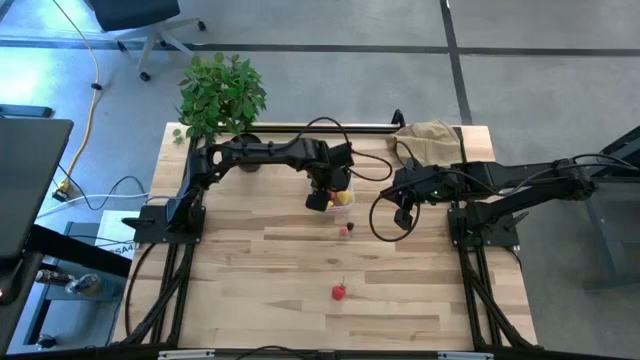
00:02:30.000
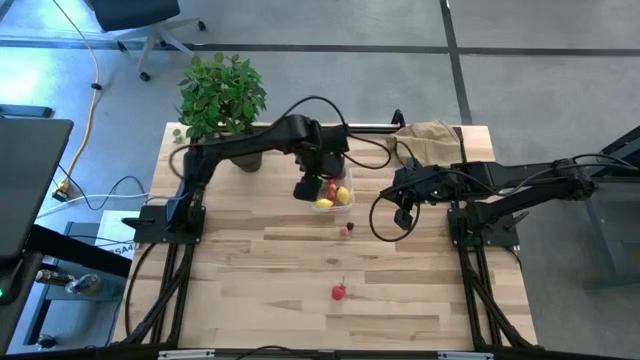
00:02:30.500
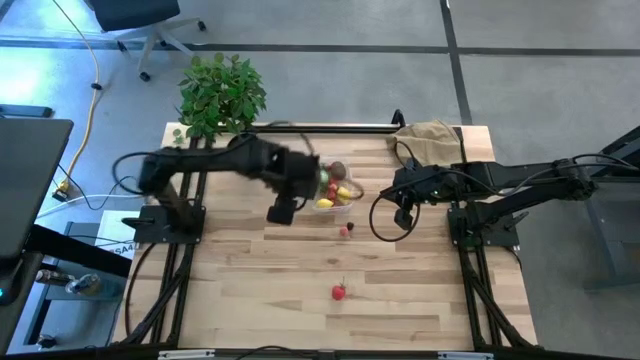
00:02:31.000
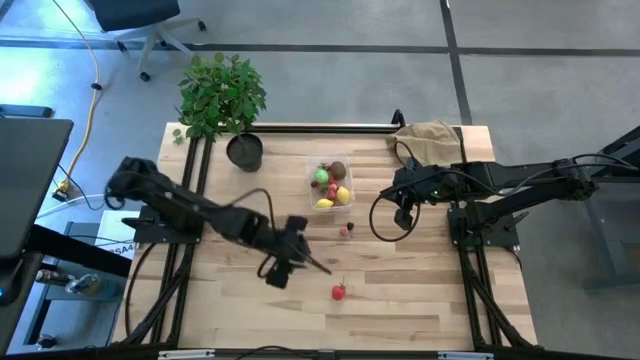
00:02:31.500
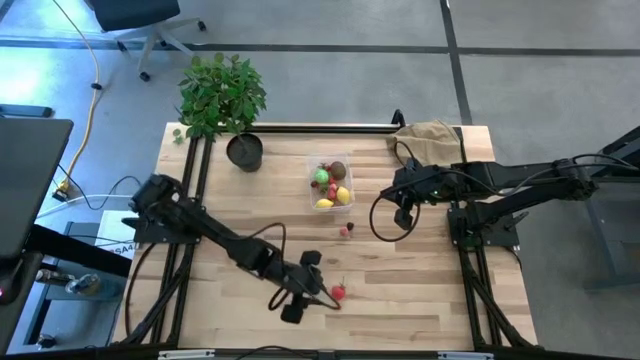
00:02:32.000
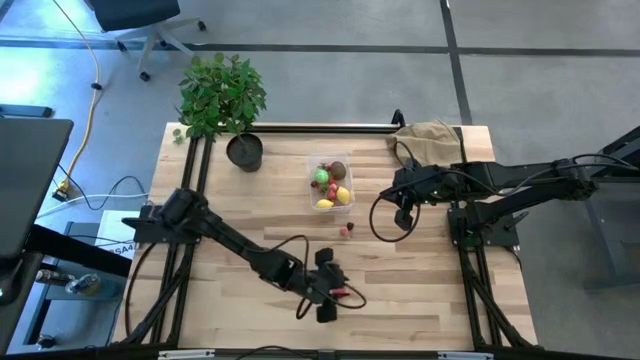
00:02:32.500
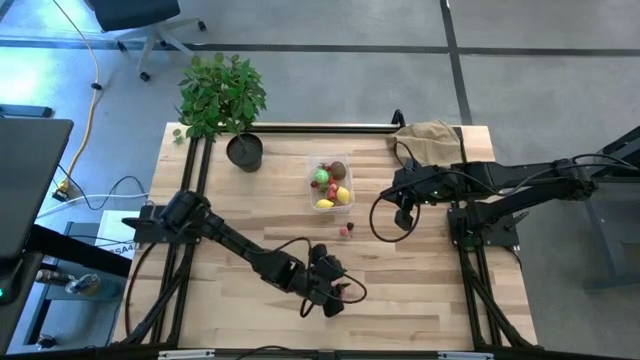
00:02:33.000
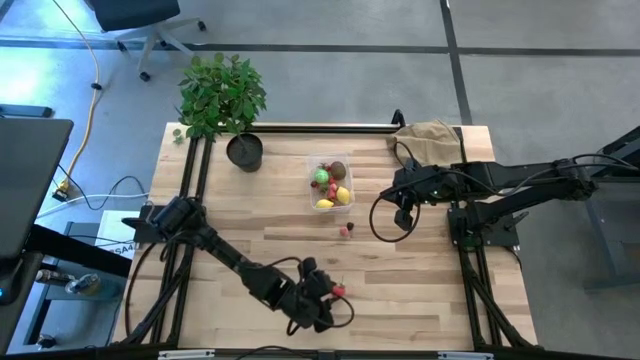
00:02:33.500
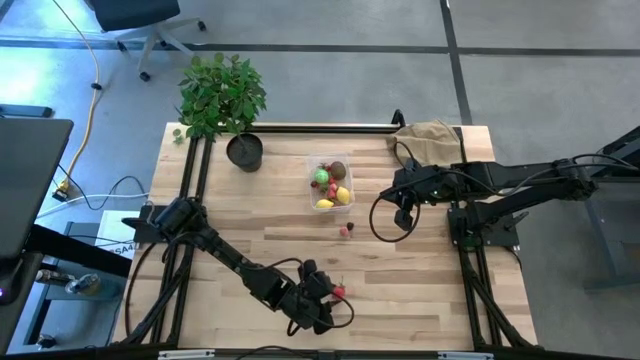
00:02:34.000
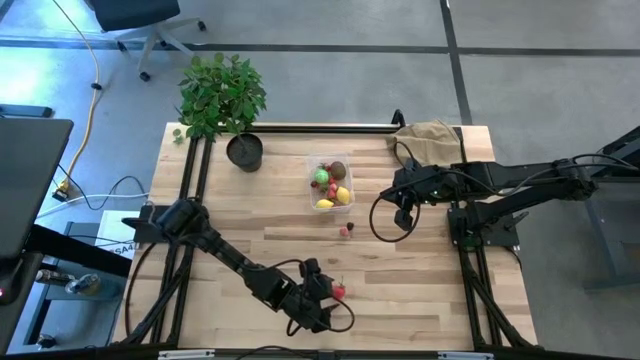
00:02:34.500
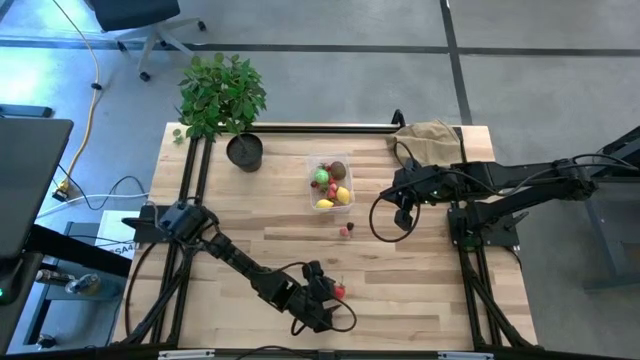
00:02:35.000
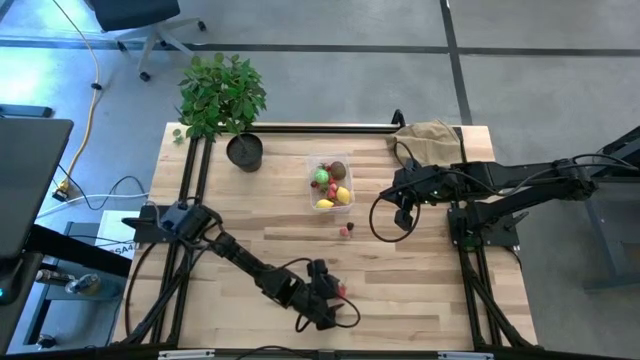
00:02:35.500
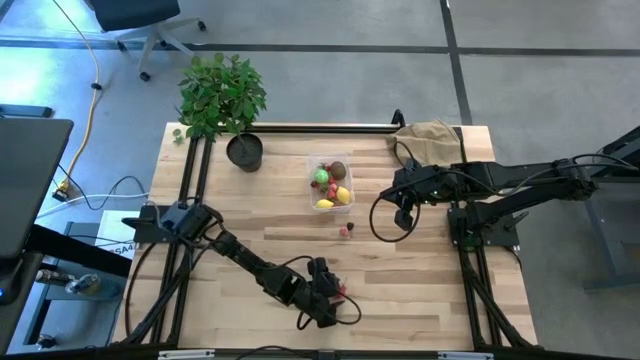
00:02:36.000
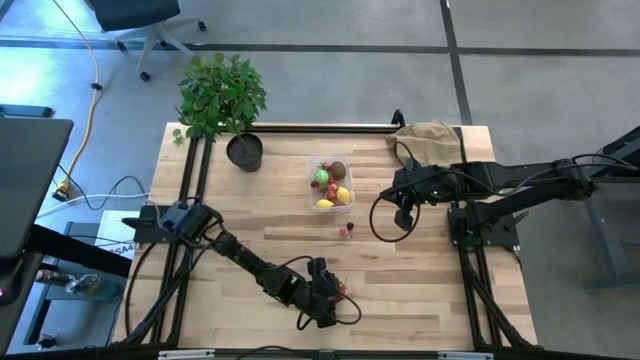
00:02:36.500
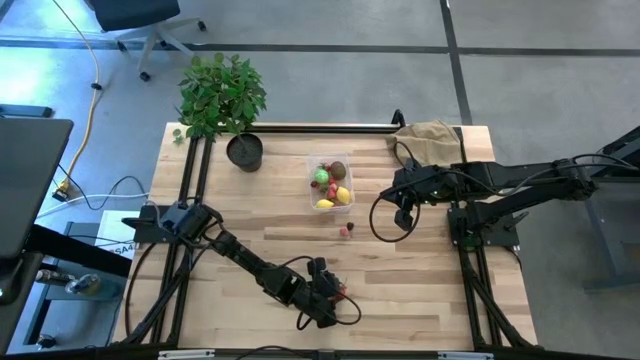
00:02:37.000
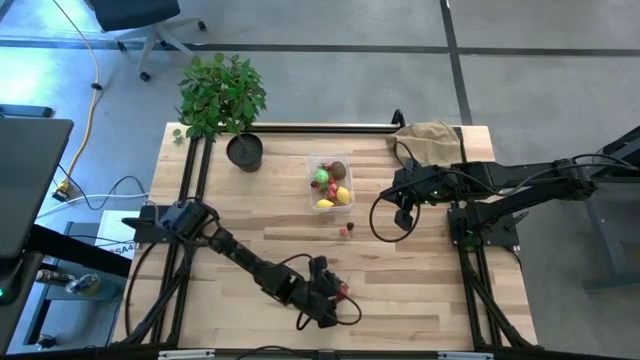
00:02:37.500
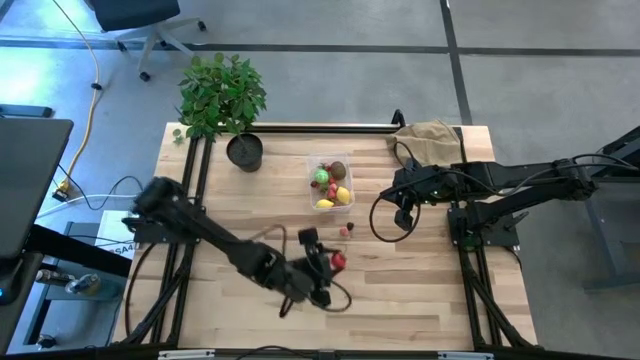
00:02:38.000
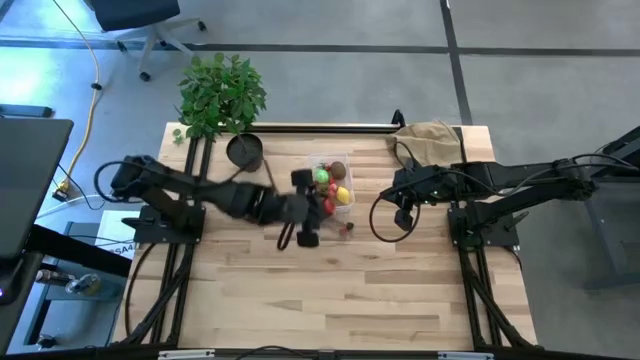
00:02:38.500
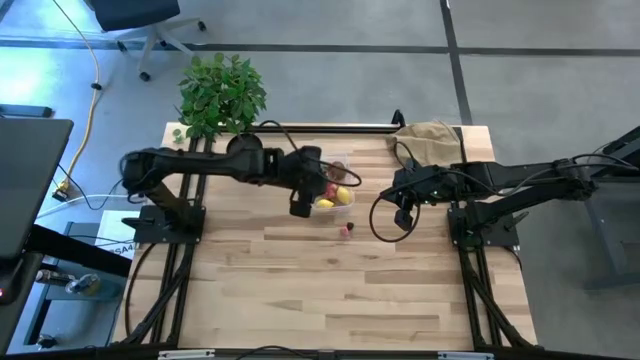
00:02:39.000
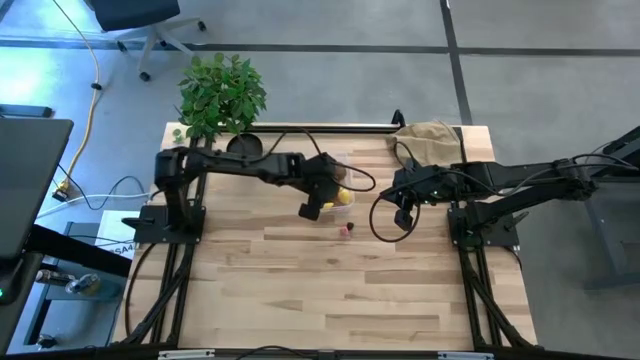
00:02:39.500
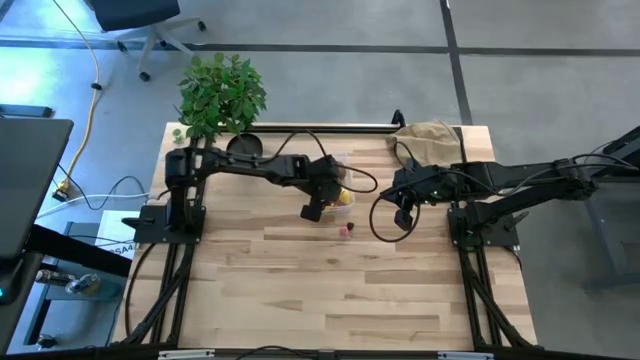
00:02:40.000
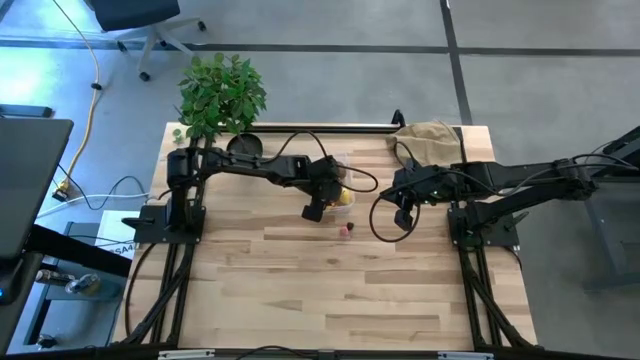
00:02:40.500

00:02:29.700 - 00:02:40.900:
Task: Pick and placing Produce into tupperware
Put the red strawberry into the transparent bin

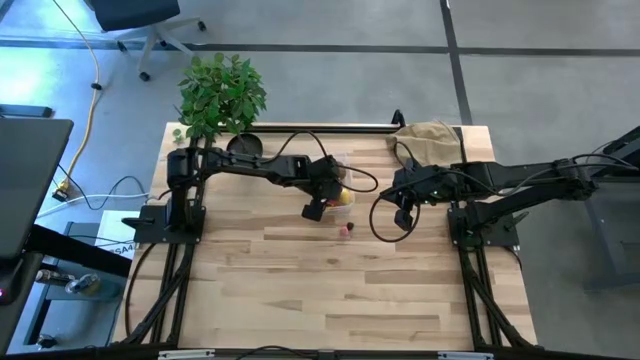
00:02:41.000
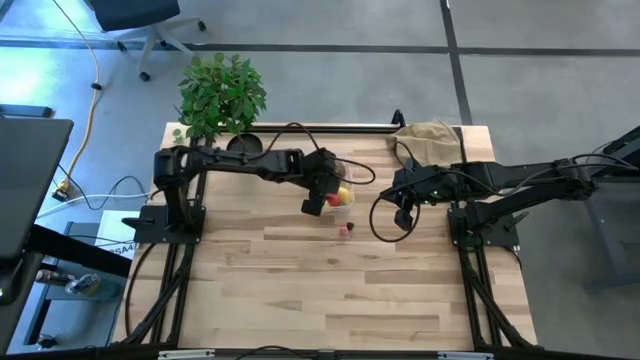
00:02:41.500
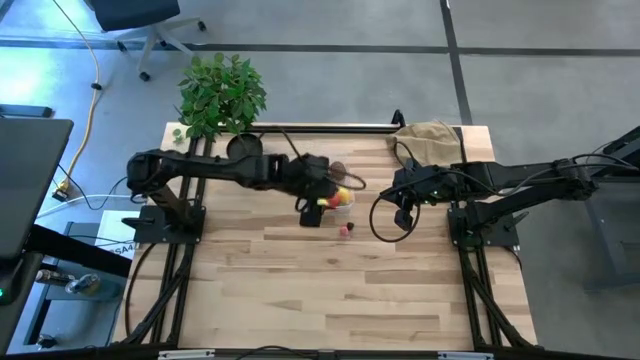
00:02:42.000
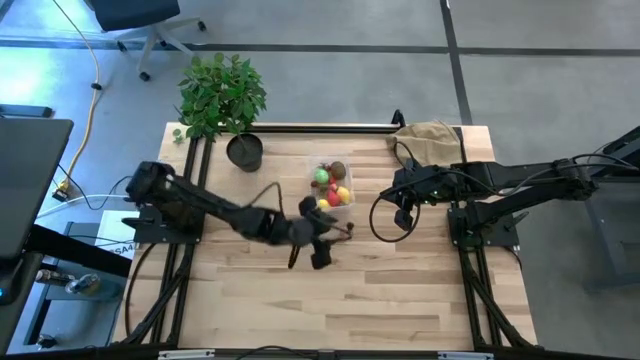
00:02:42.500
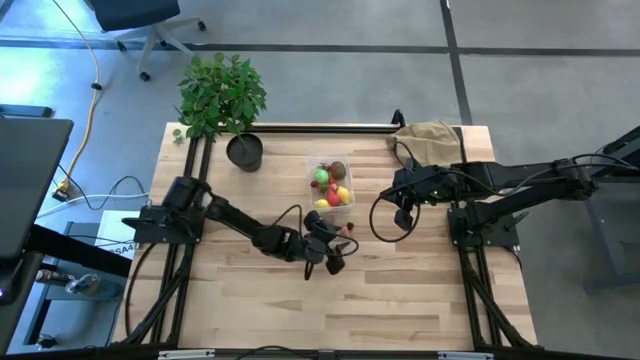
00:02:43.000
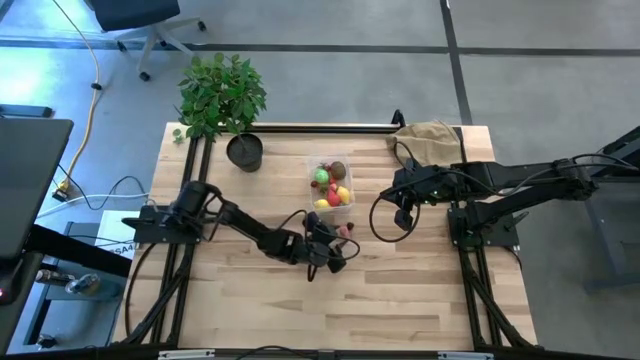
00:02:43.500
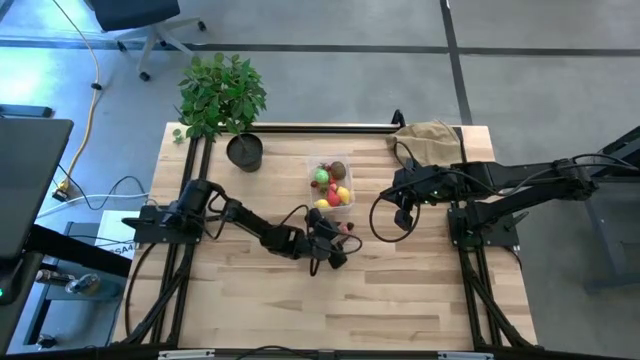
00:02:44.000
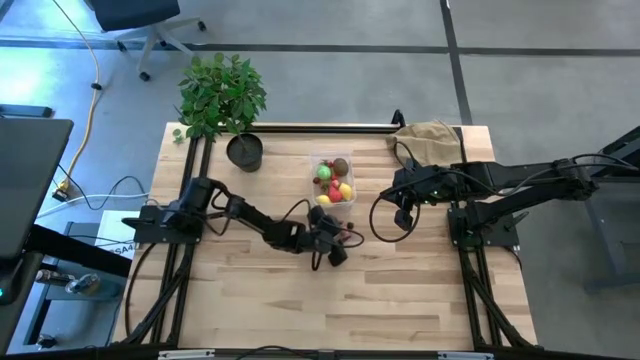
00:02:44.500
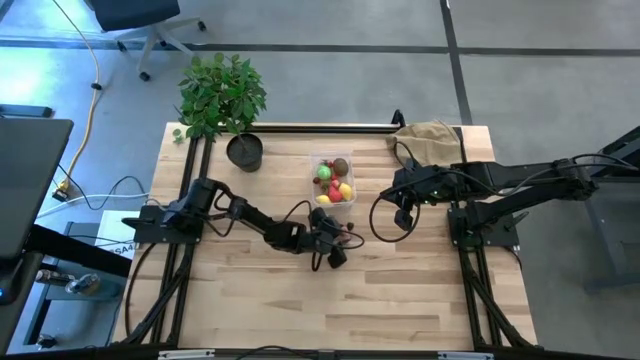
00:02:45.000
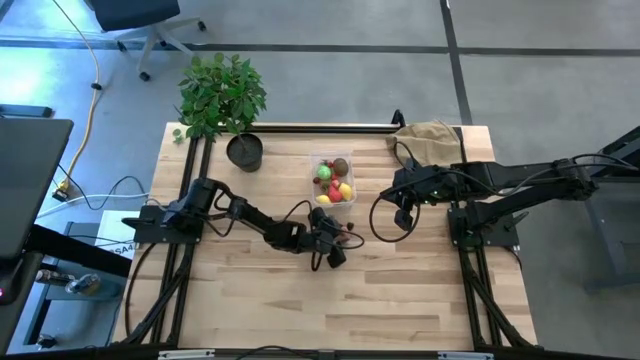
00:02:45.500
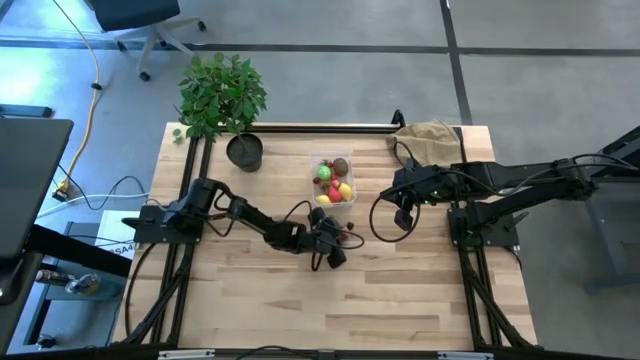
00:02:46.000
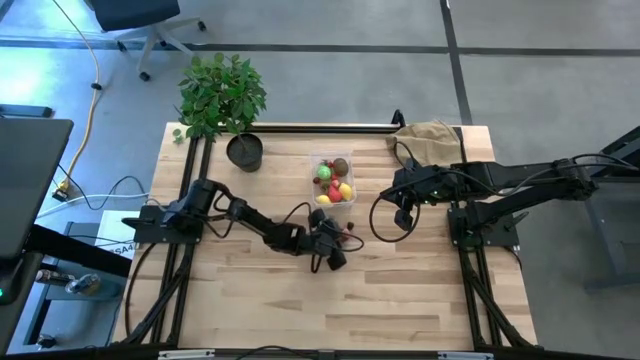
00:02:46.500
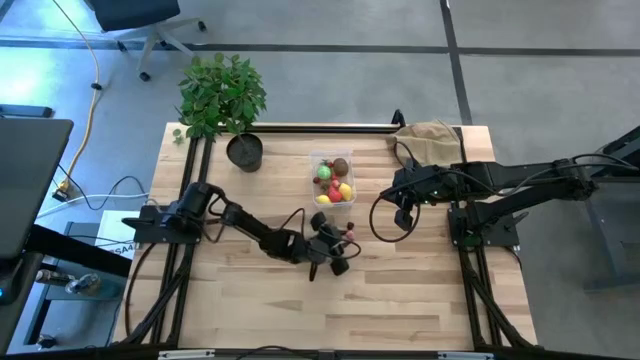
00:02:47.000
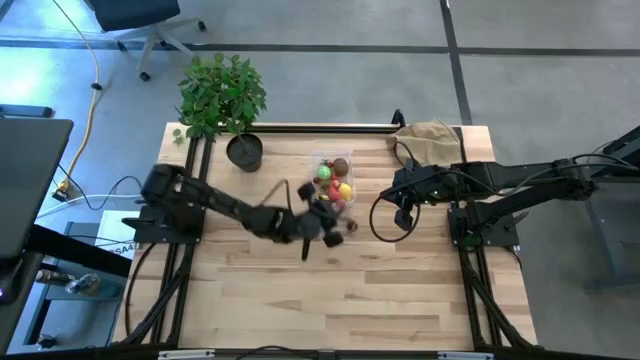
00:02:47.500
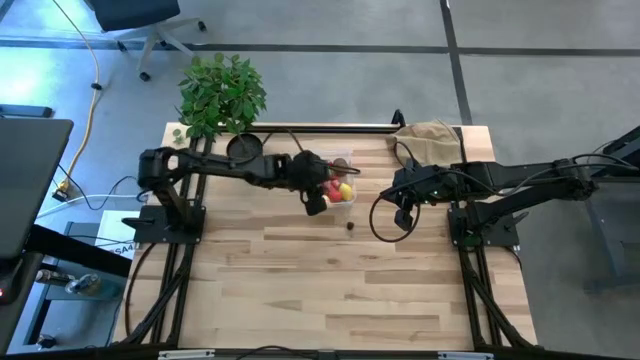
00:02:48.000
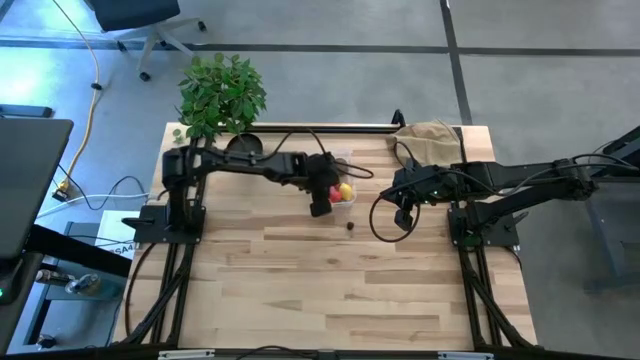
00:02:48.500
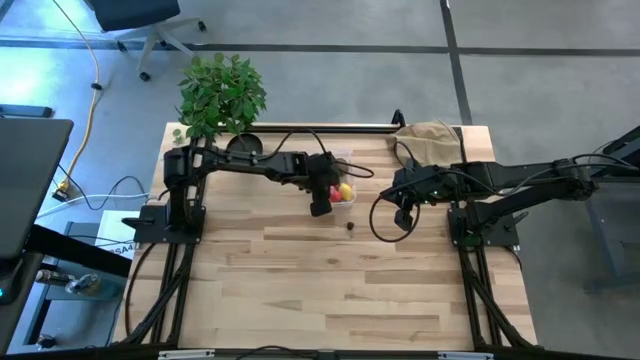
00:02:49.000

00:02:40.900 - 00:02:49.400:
Put the pink peach into the transparent bin
